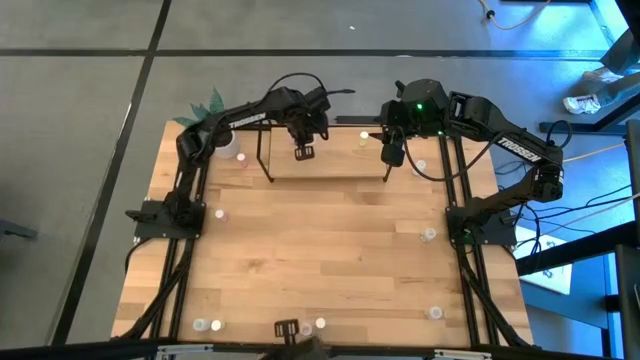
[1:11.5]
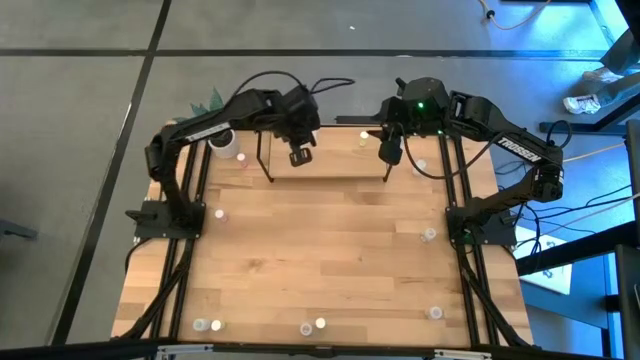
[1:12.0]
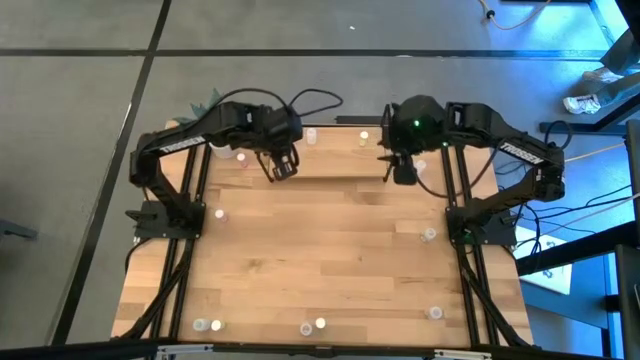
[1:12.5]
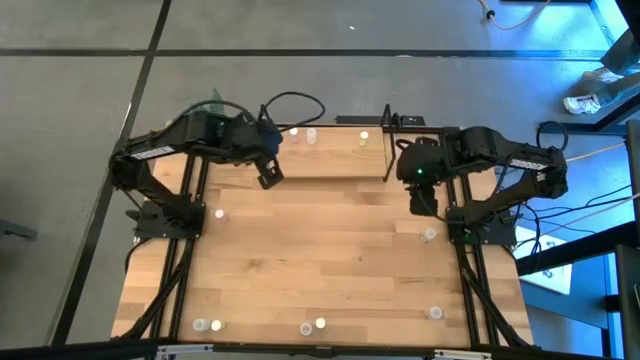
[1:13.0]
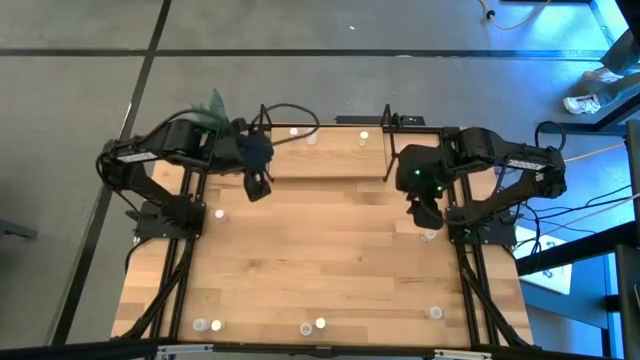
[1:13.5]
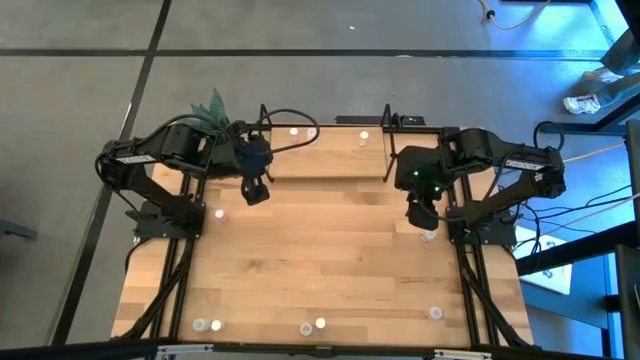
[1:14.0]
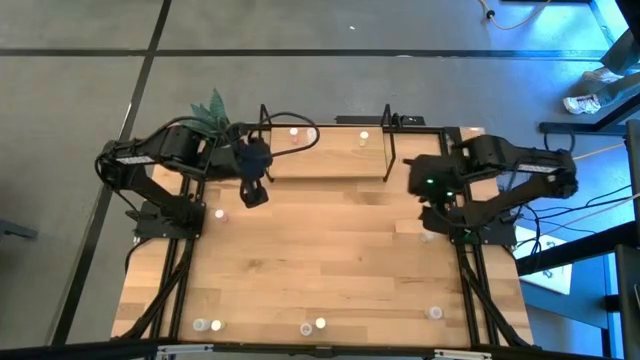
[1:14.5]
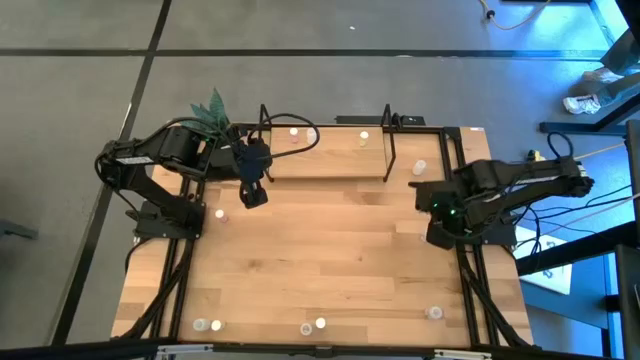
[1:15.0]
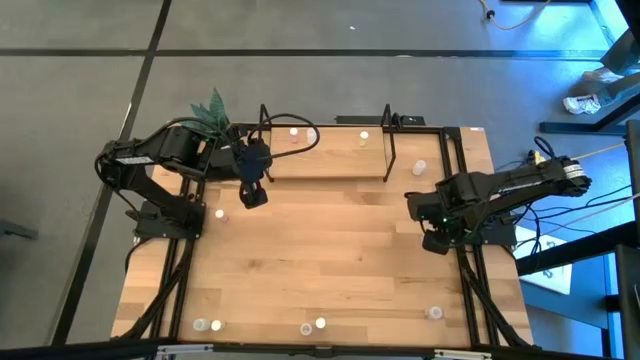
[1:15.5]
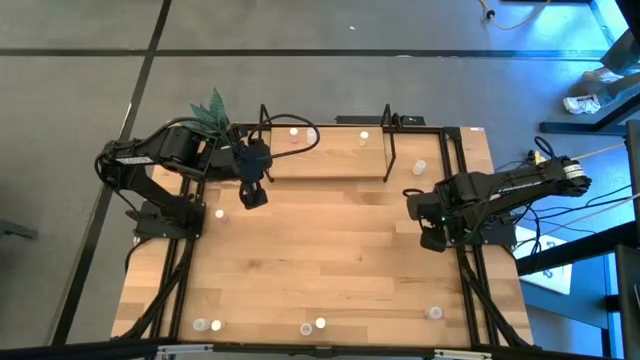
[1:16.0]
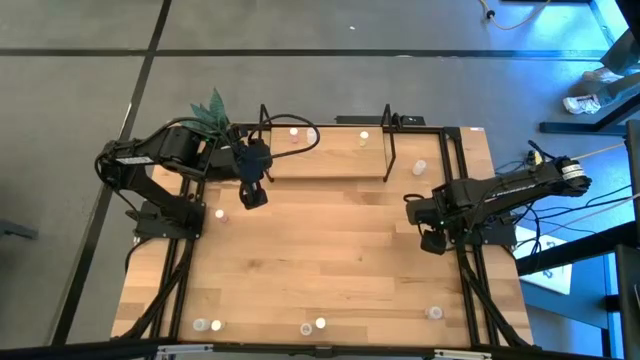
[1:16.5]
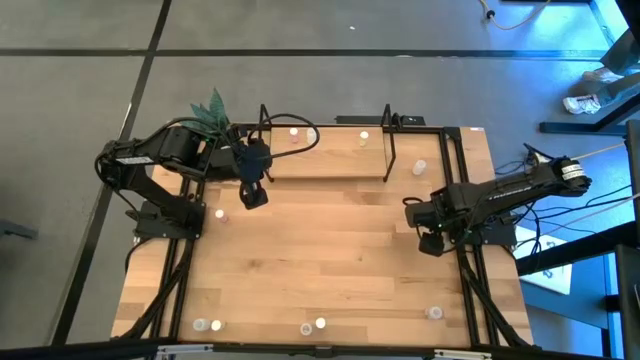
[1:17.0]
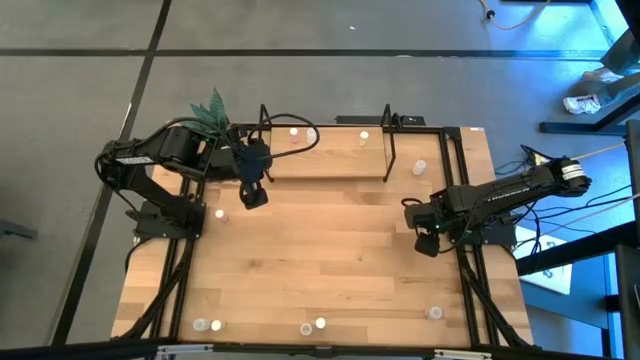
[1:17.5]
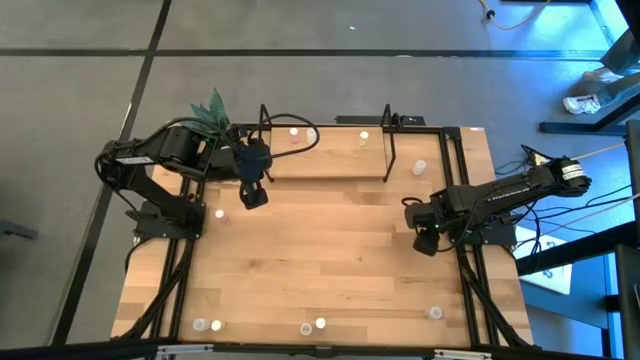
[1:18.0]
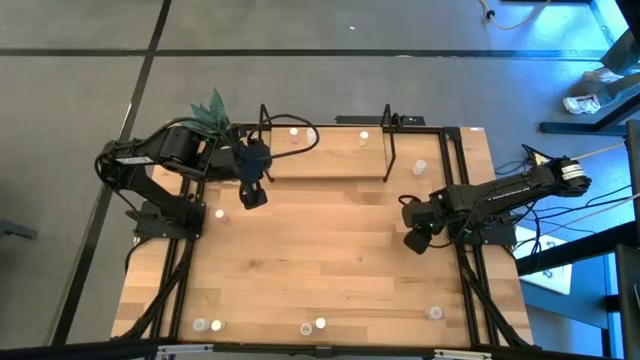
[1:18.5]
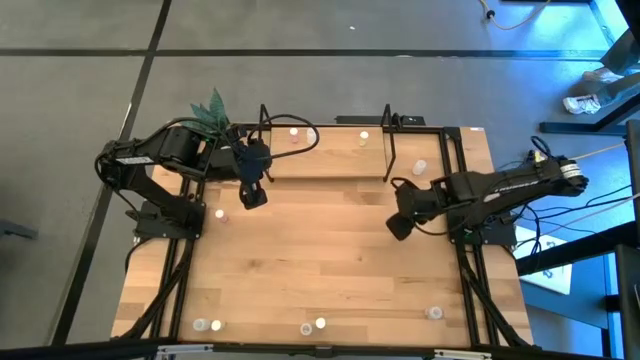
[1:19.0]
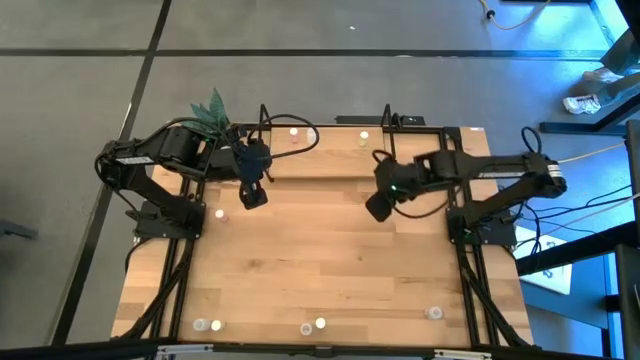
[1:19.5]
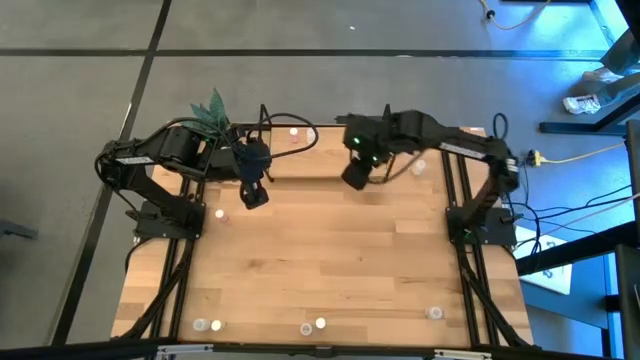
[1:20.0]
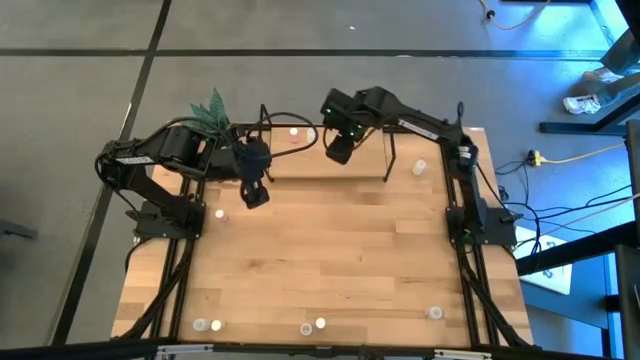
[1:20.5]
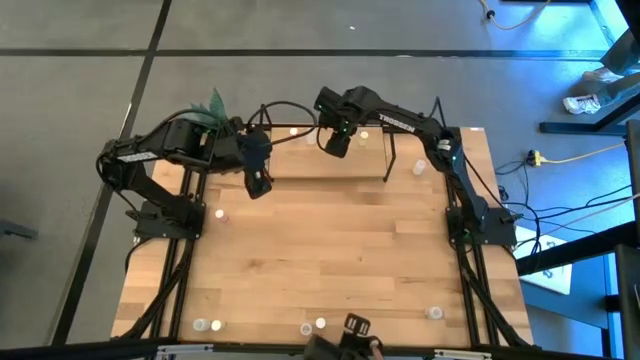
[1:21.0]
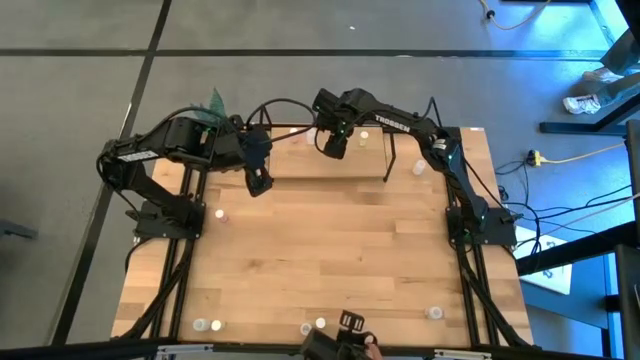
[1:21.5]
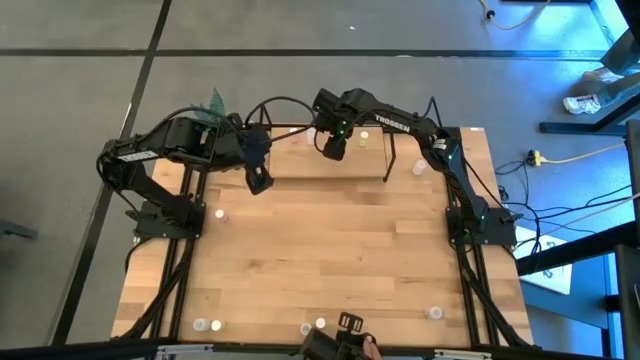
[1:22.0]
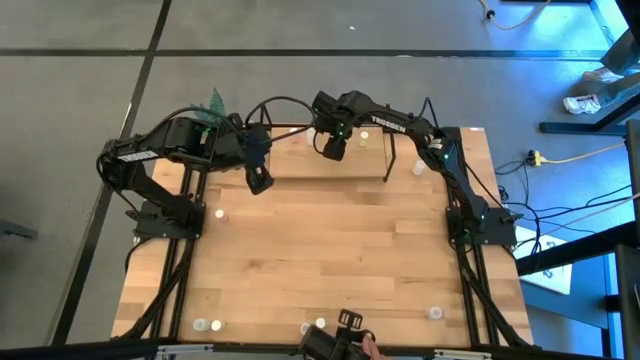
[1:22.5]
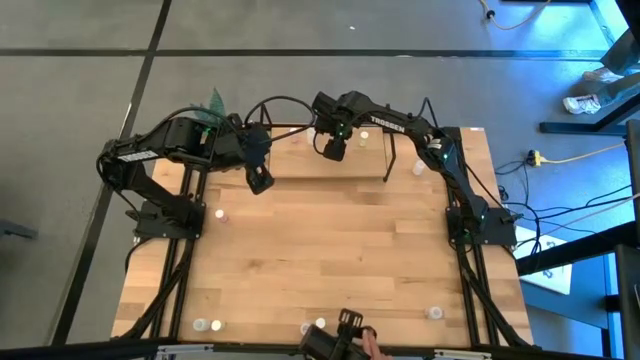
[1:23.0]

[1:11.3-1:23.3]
Task: Pick and place medicine bottles onto shelf by color
Put the top transparent pill bottle on the shelf

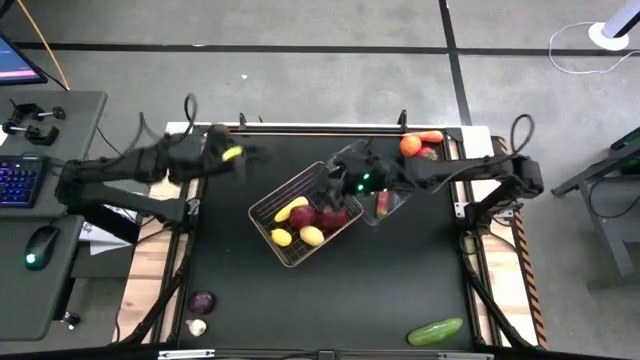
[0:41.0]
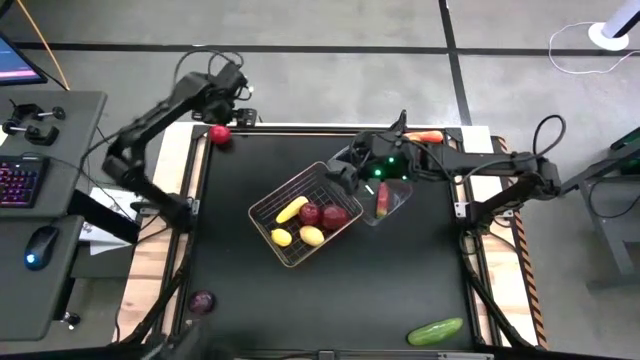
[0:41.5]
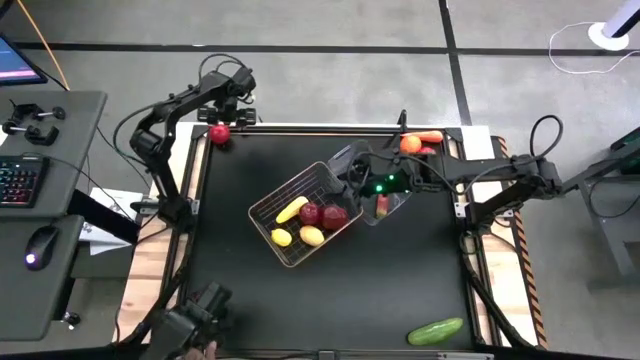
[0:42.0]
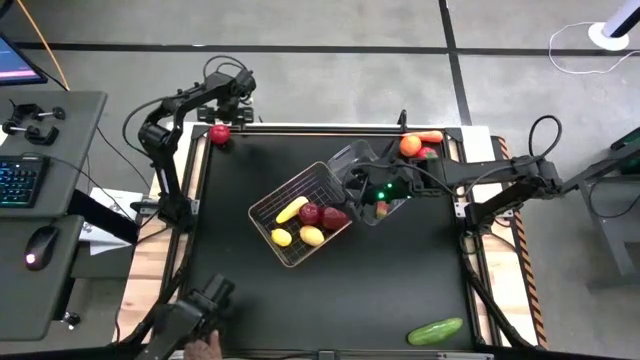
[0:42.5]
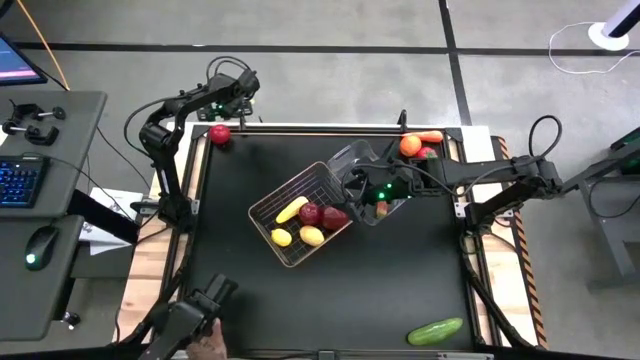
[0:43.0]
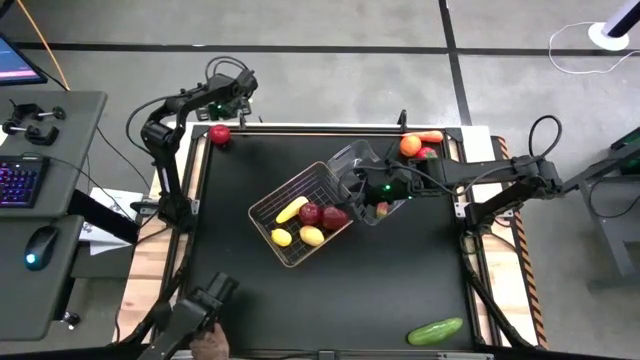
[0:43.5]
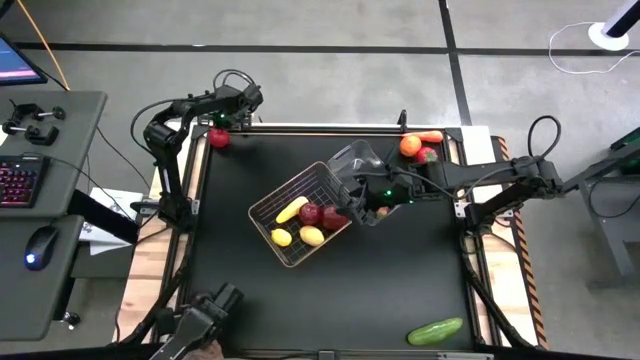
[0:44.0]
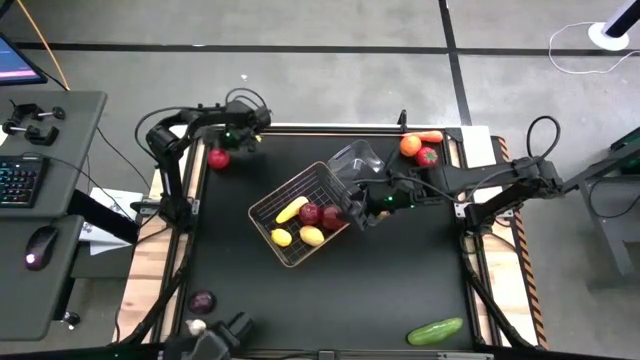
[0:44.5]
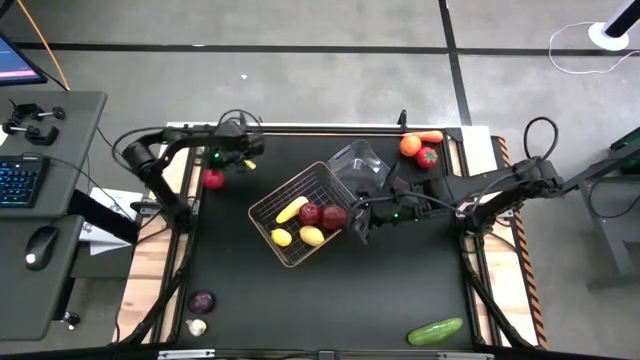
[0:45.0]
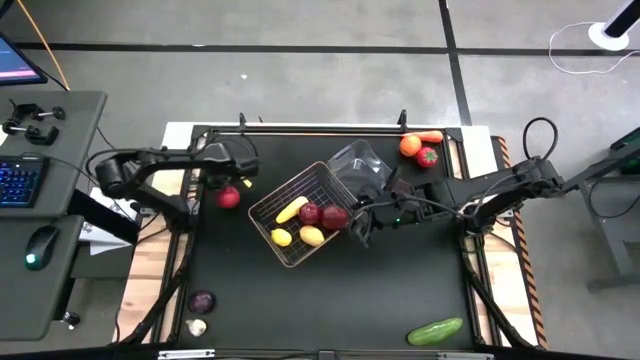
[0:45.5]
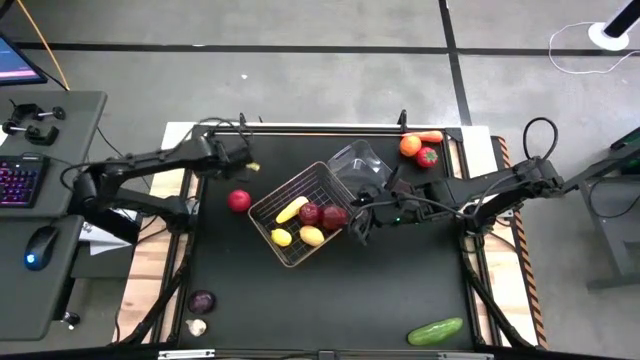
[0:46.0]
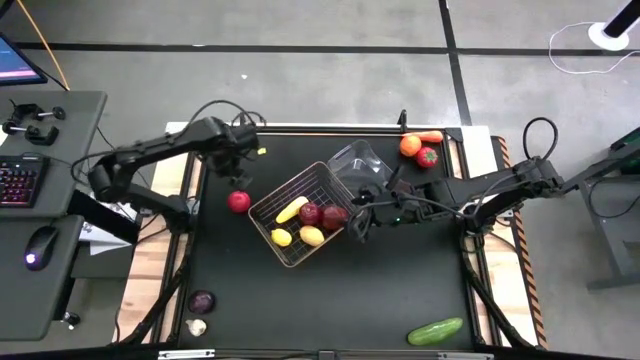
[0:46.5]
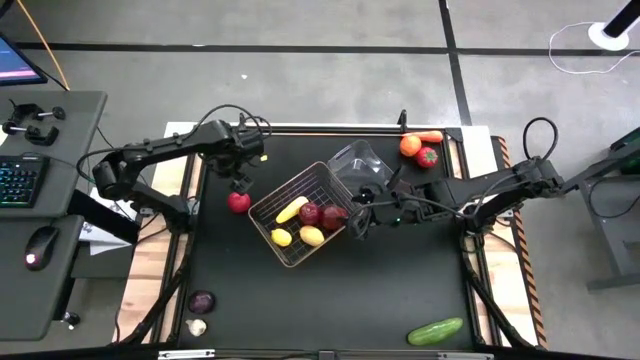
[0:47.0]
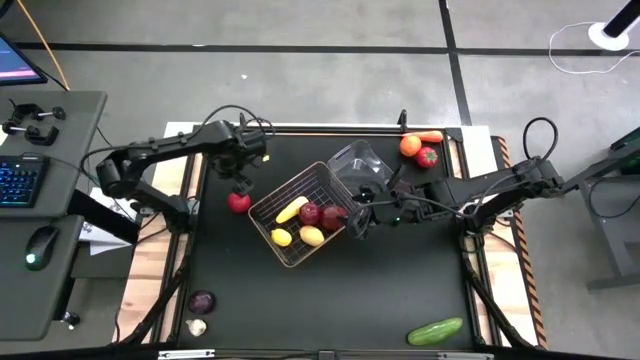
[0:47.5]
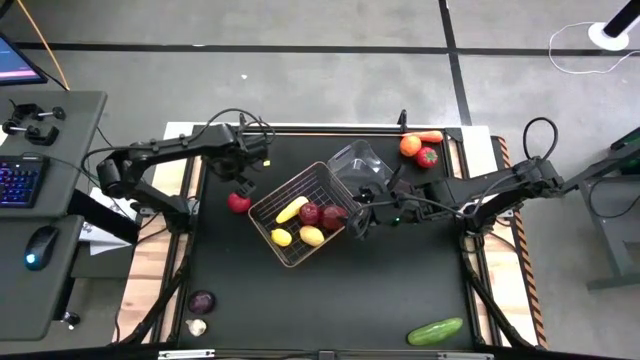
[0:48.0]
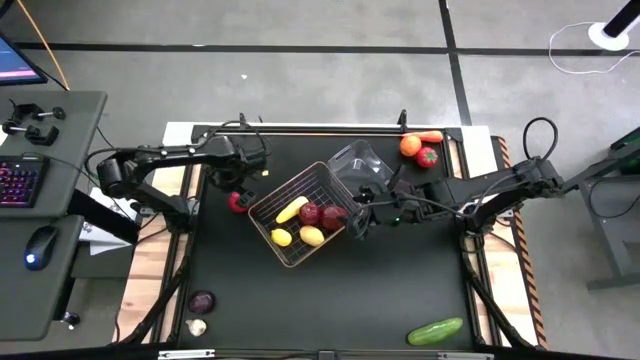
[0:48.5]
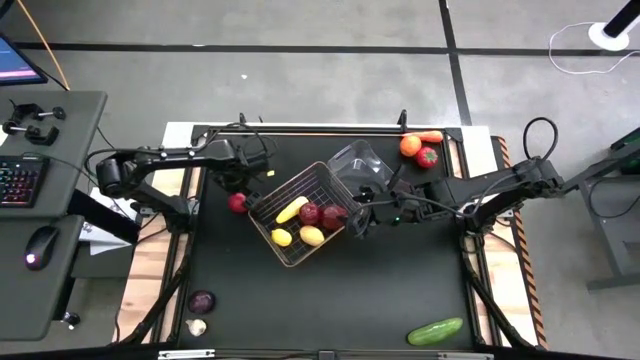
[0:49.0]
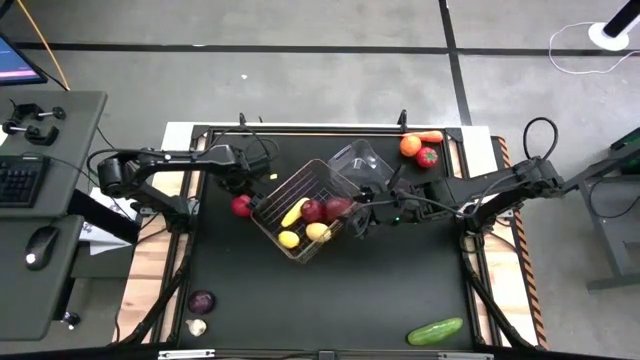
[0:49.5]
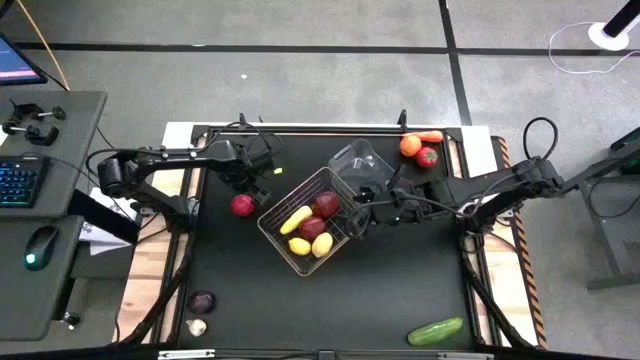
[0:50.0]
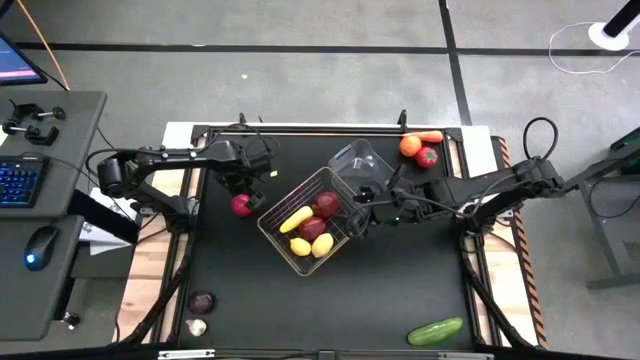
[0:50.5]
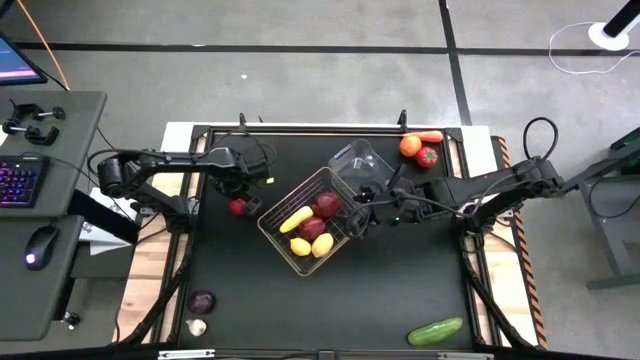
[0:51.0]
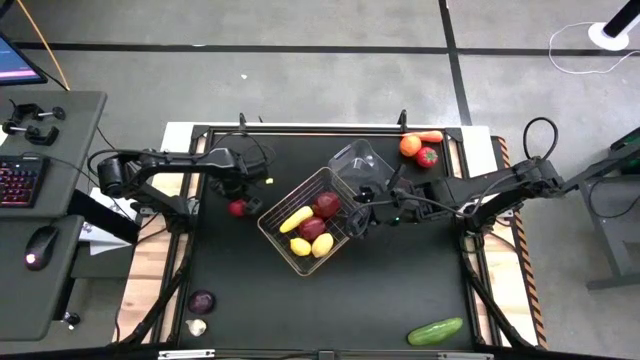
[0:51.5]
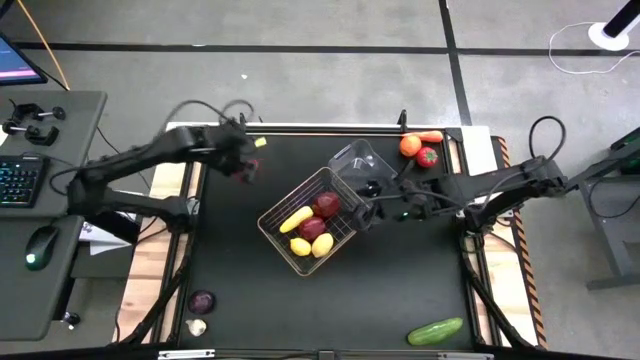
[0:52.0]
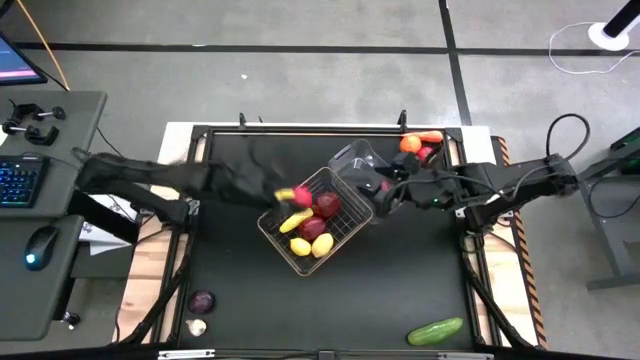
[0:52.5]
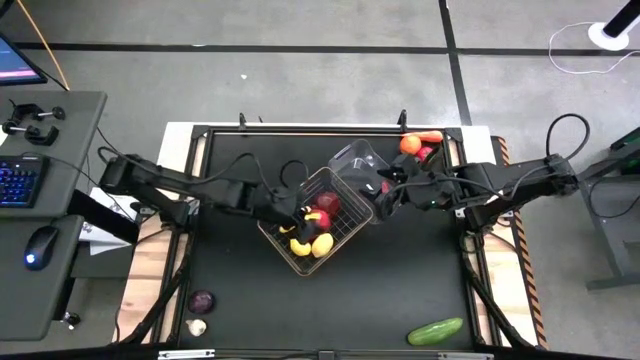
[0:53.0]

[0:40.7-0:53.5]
Task: Sort produce into baskets
Put the left tomato into the gold wire basket
